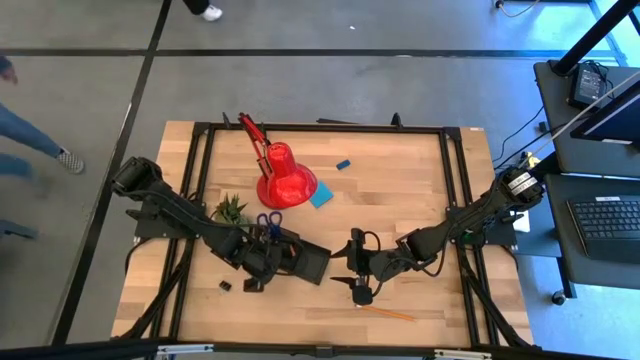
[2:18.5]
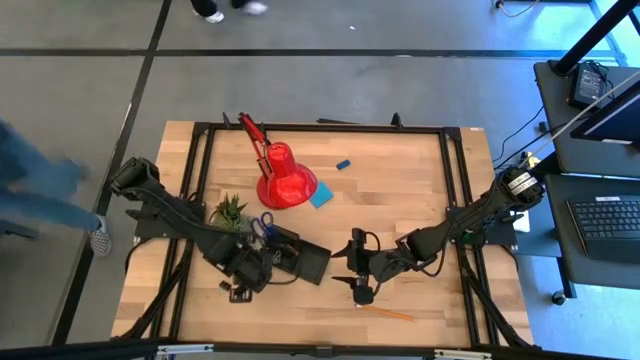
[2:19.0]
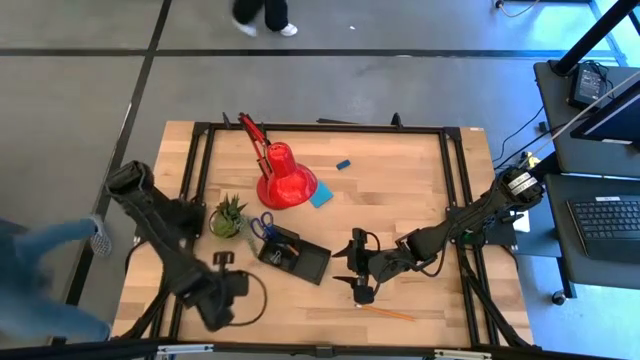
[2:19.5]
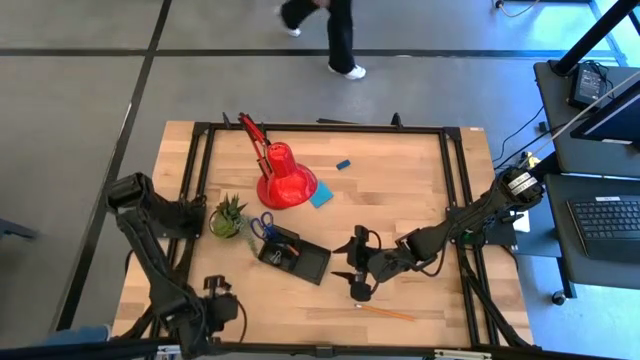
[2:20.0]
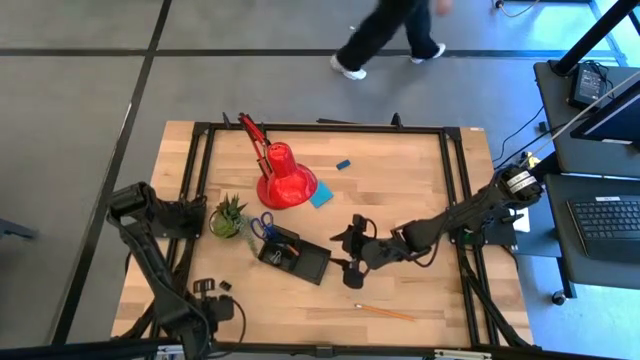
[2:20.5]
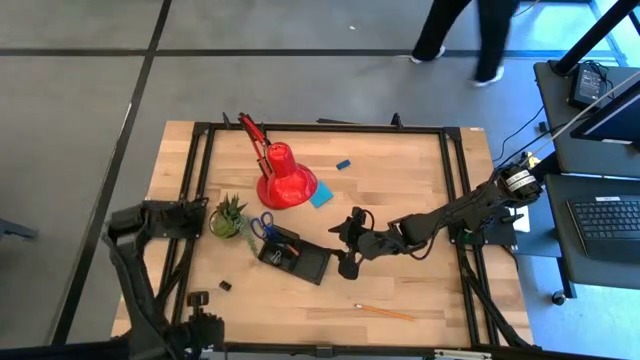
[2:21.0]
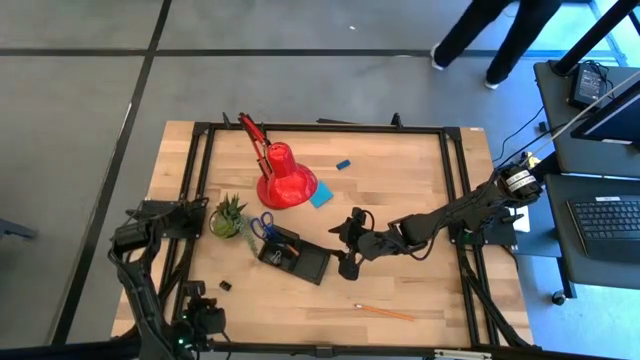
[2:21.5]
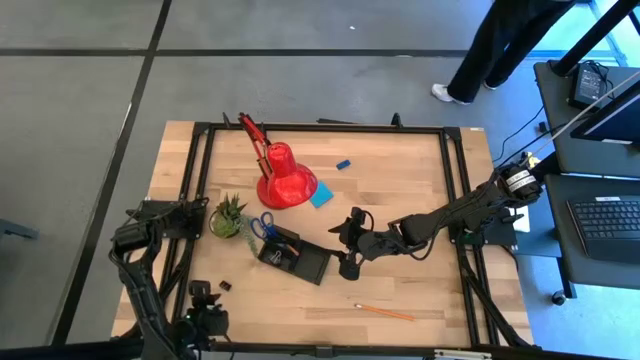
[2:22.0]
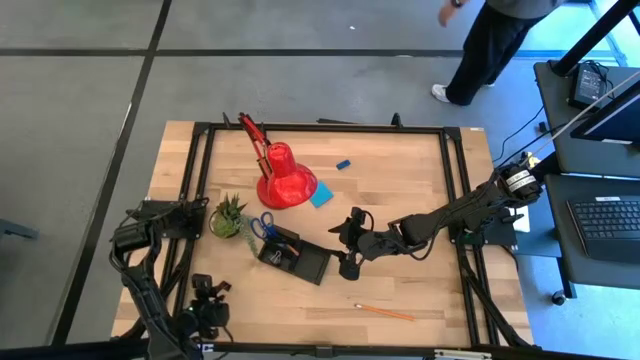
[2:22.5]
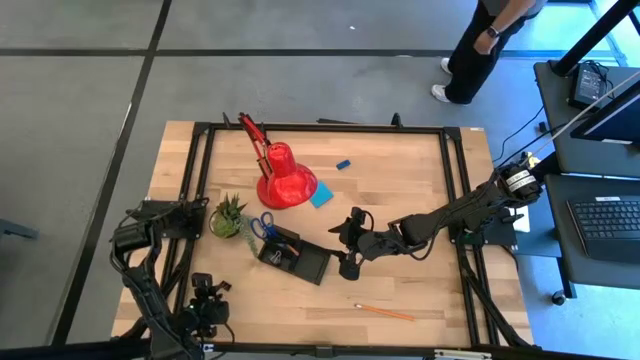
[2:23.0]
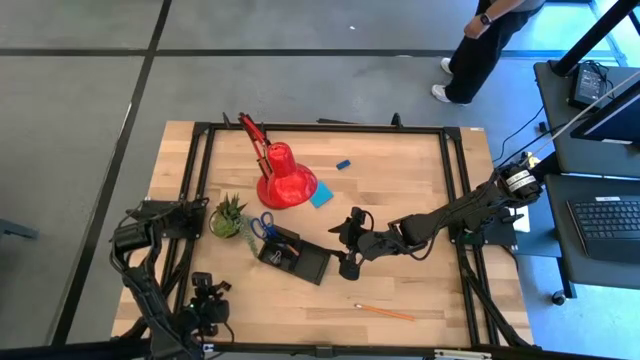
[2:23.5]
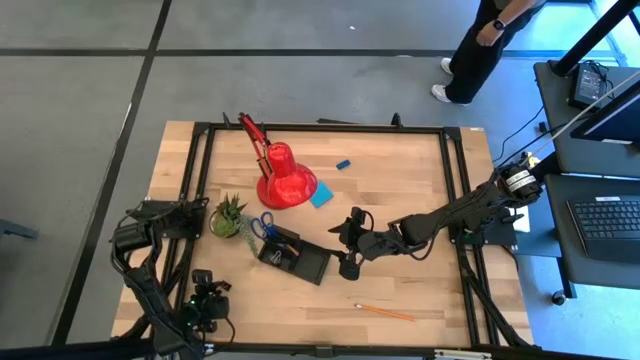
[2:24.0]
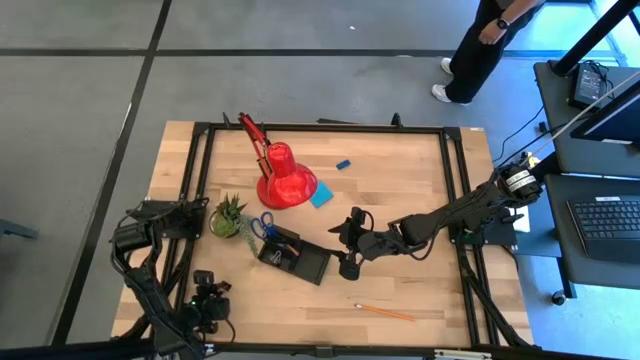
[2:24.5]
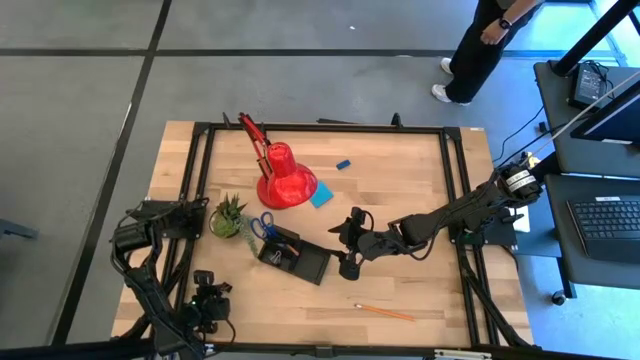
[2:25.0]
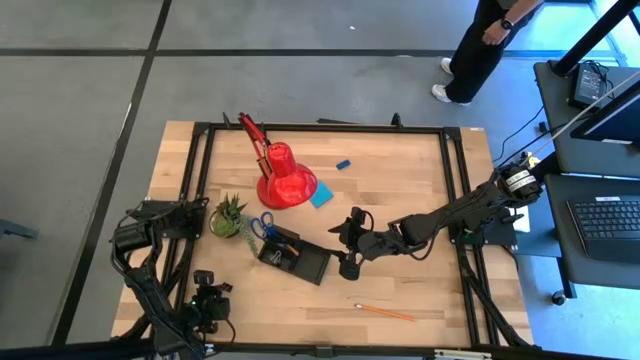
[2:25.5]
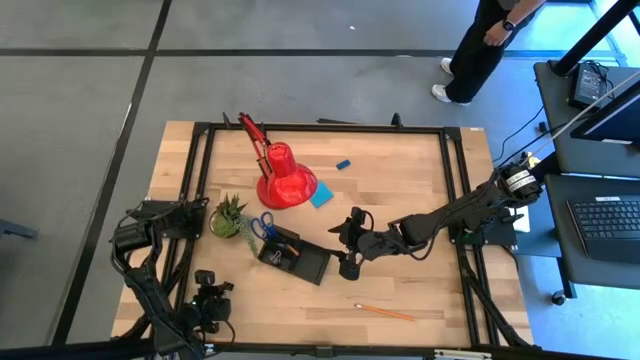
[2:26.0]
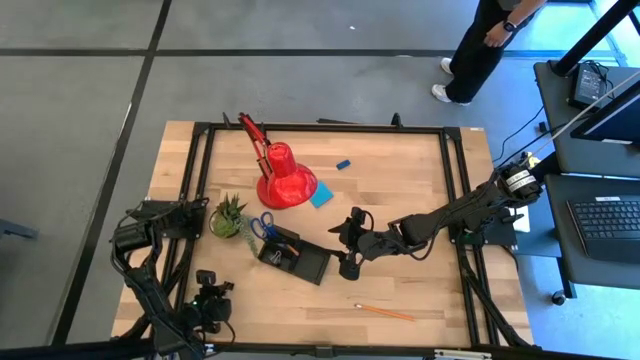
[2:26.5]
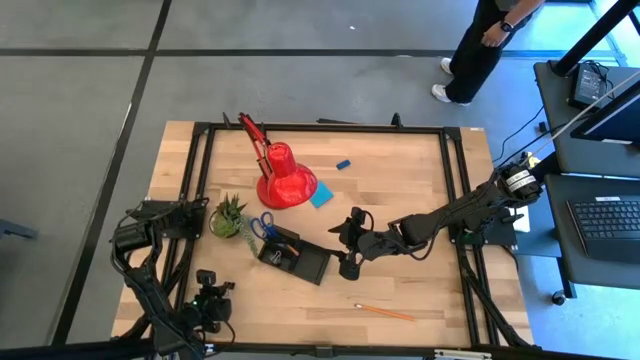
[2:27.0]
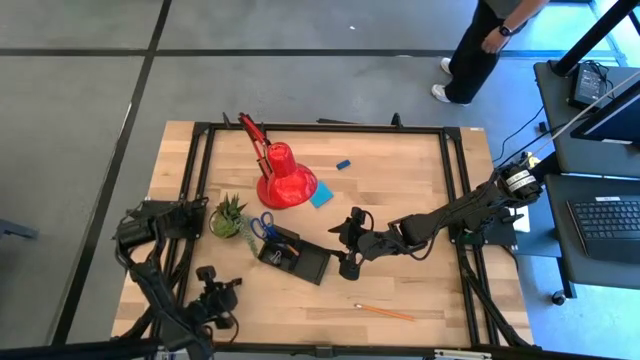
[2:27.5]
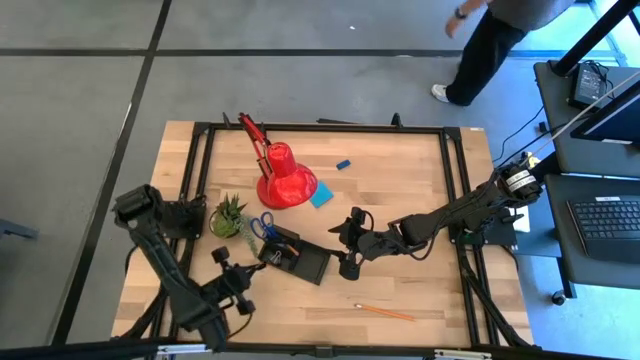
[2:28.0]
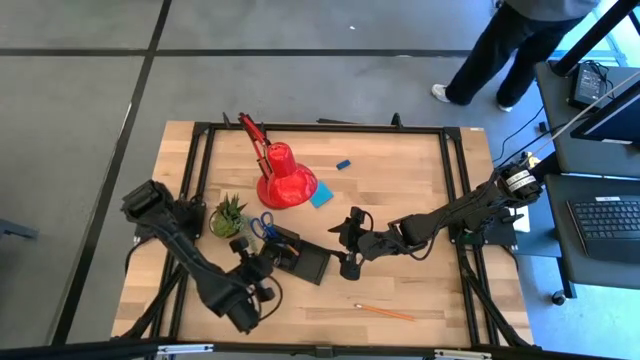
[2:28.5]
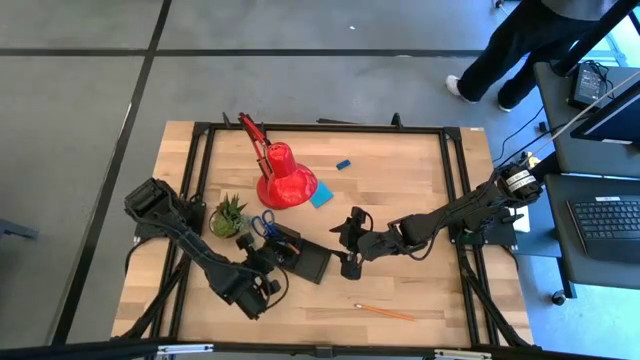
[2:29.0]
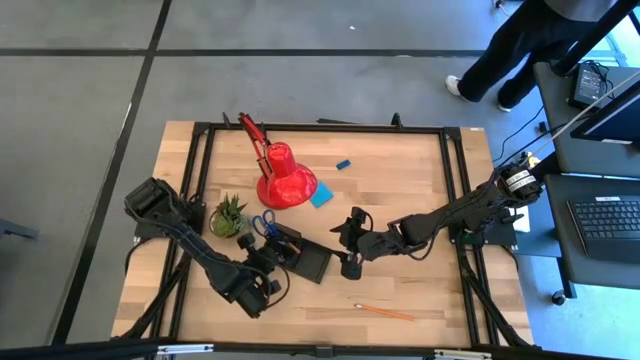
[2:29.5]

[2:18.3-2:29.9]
Task: Pick and place office supplies into organizer
Put the black binder clip into the desk organizer

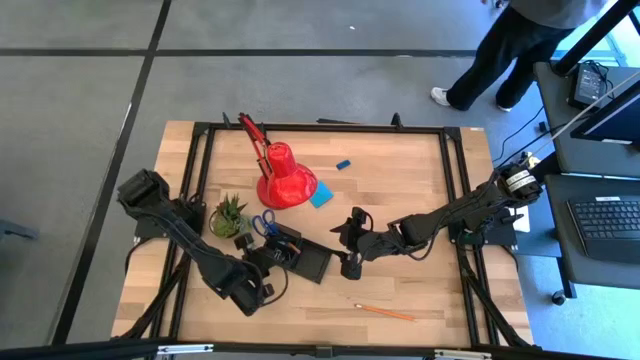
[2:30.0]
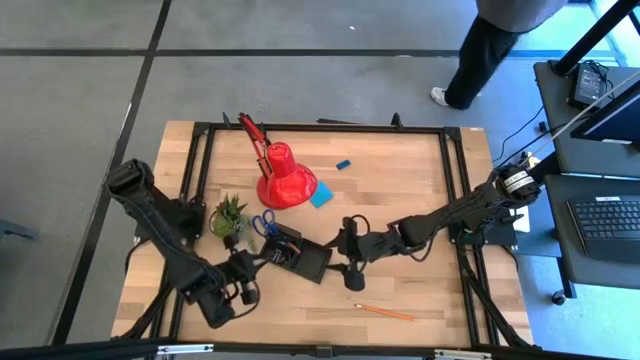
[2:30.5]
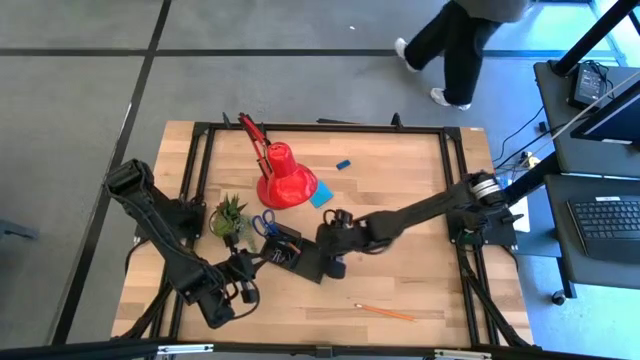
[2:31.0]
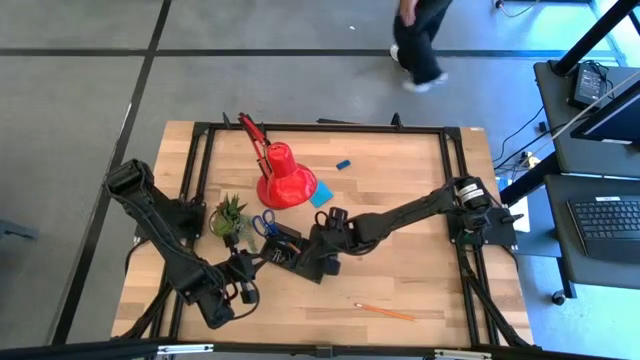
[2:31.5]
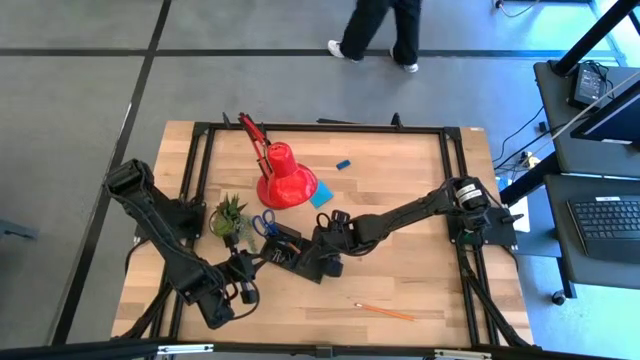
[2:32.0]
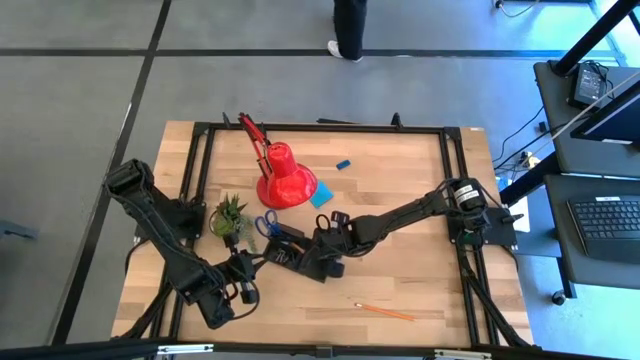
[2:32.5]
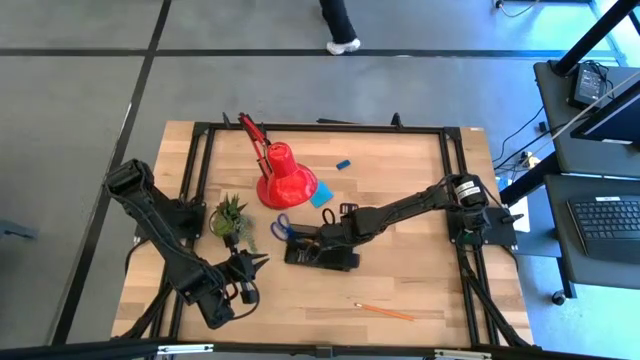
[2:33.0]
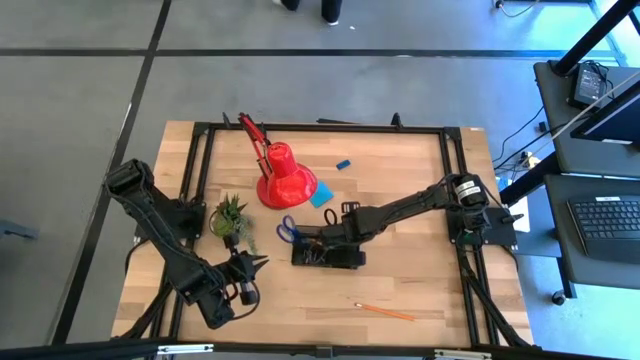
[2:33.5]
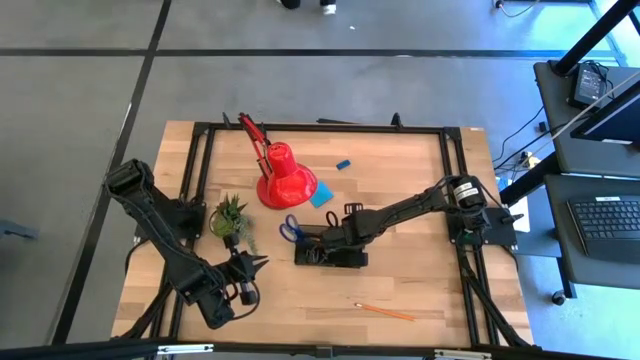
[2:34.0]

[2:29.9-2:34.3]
Adjust the desk organizer on the table

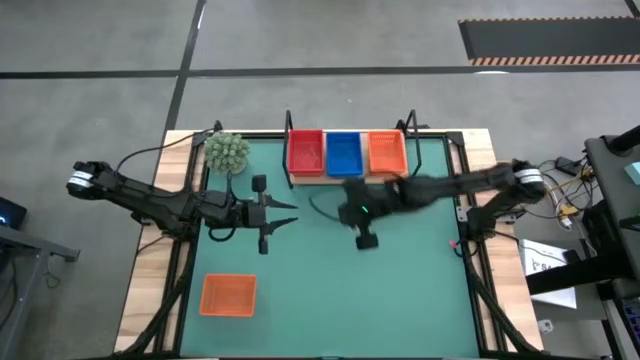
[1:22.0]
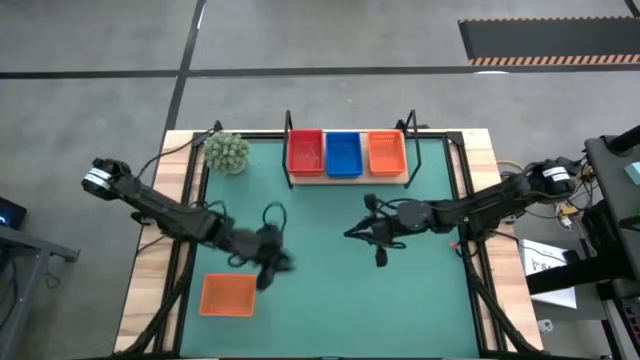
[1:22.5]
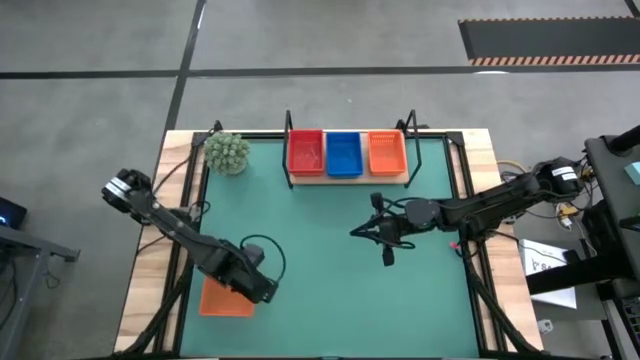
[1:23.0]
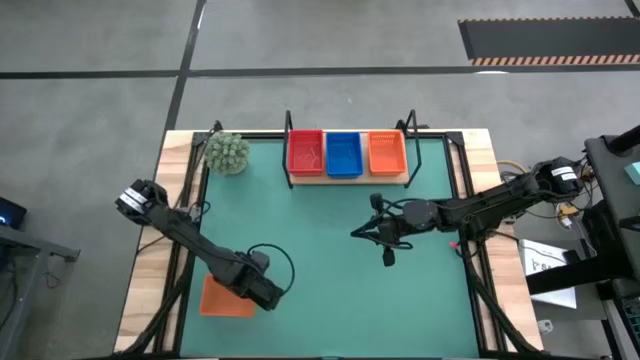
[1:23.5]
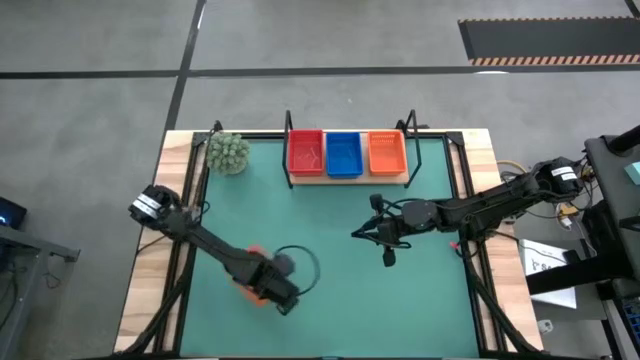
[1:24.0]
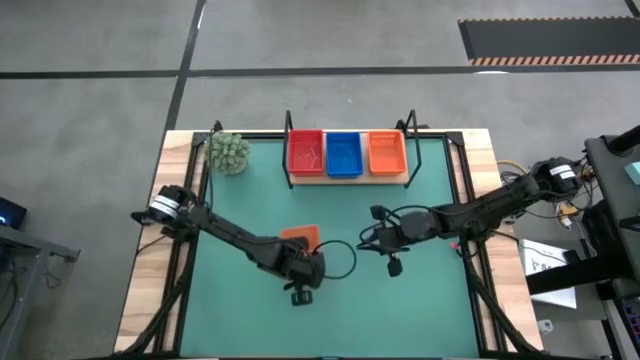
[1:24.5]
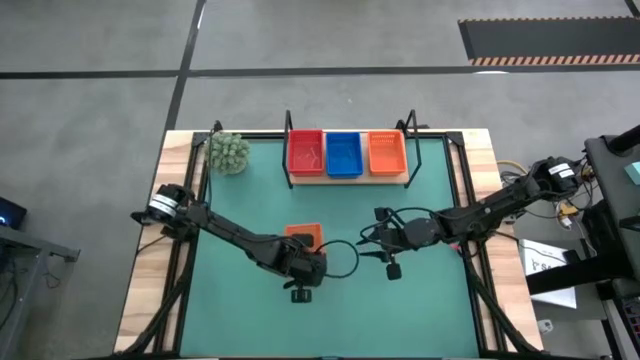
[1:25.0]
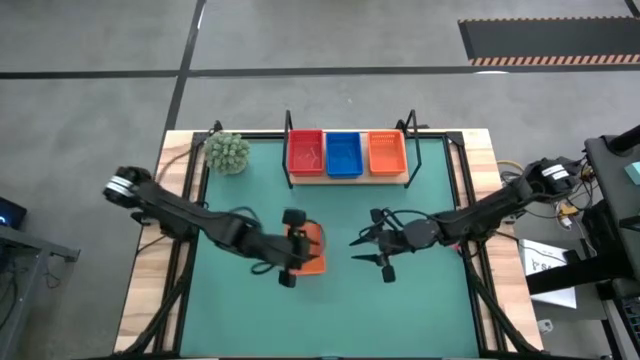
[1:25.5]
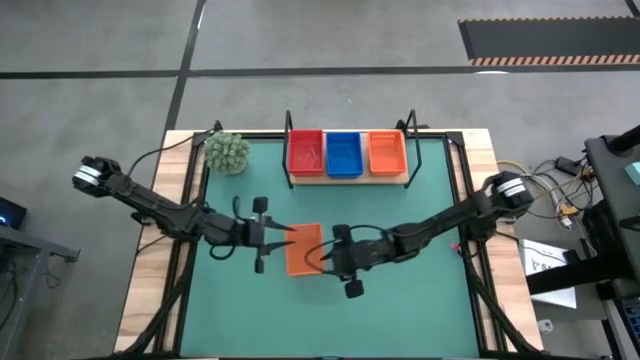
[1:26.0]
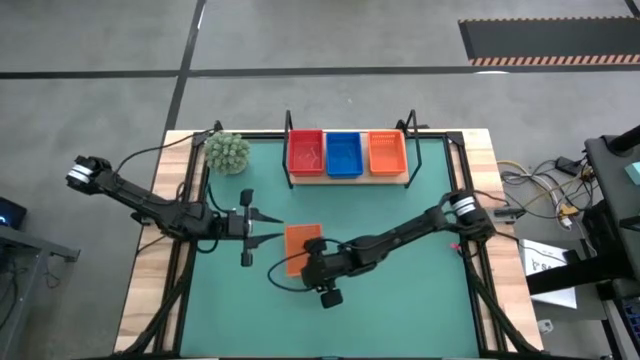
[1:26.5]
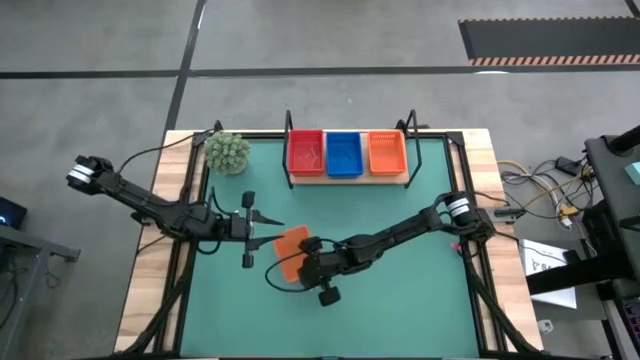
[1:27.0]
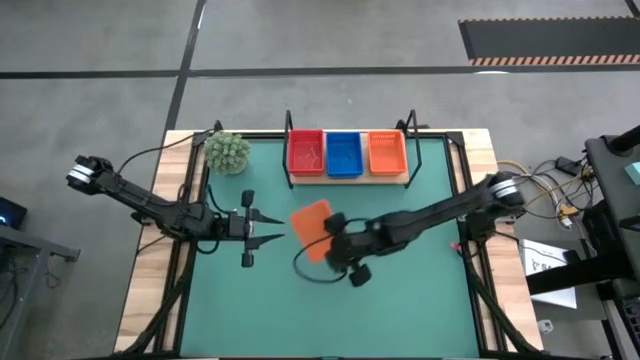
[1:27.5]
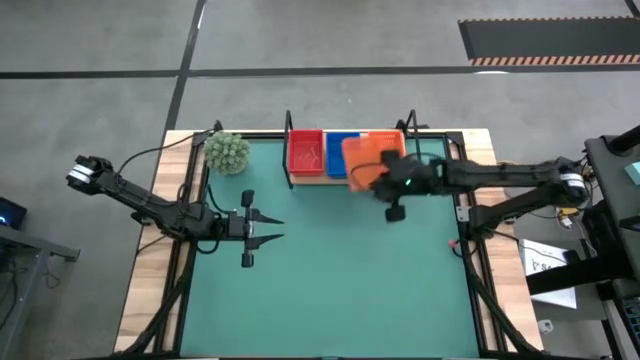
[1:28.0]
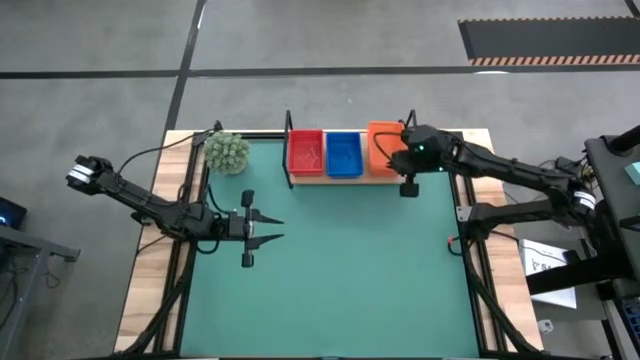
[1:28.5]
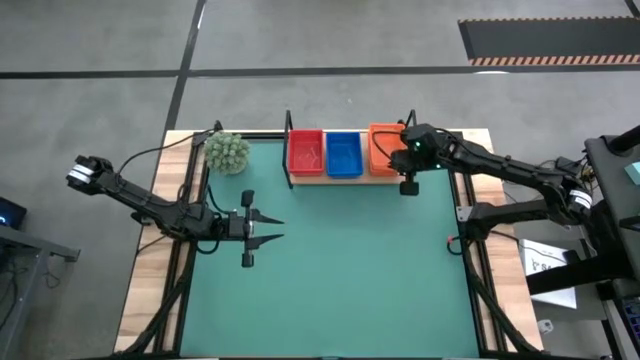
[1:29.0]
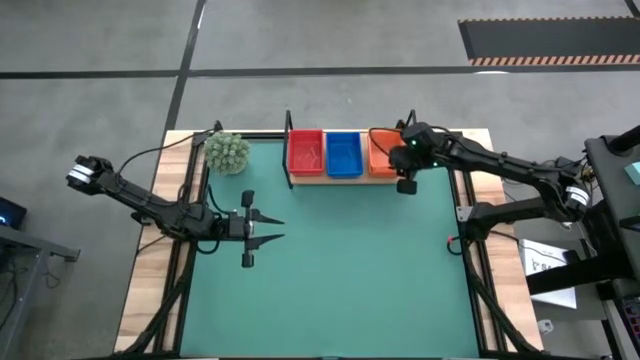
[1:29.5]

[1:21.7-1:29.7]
Task: Stack baskets on shelf by color
Stack the orange bin on top of the stacked orange bins on the shelf
